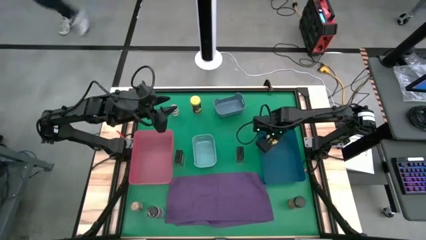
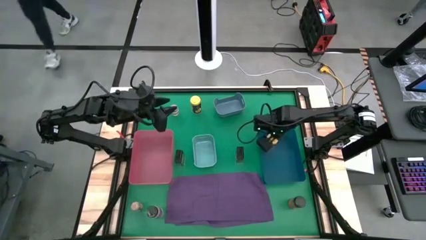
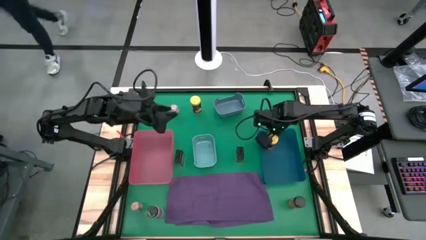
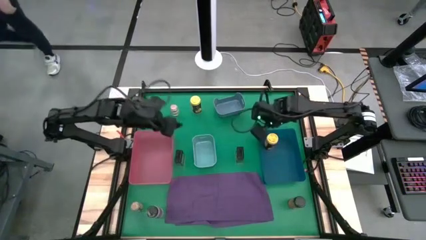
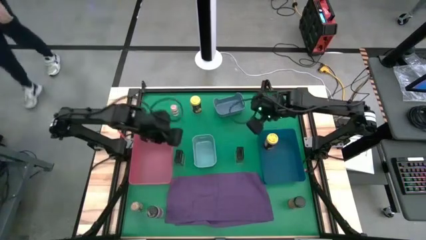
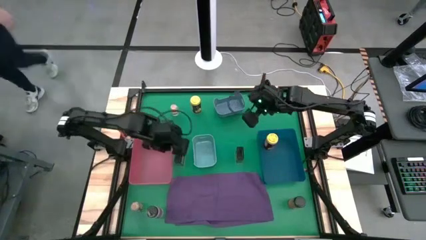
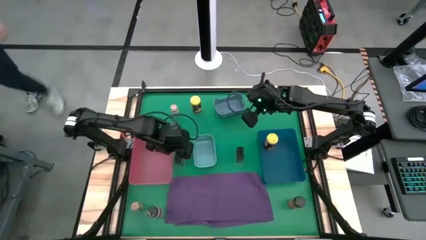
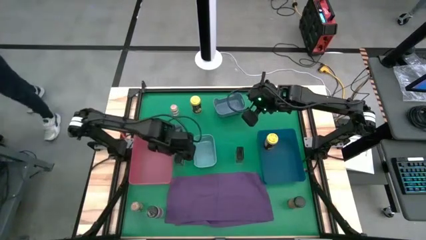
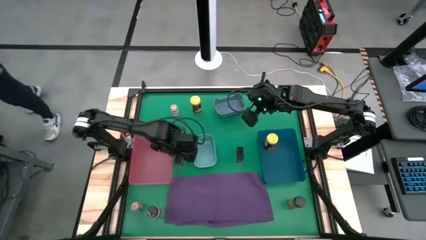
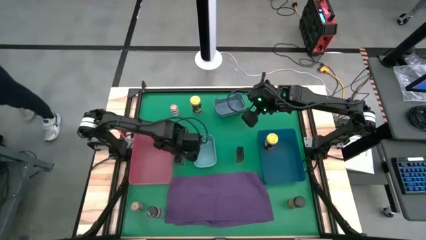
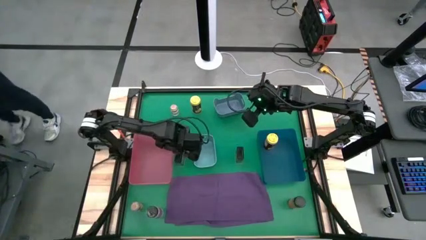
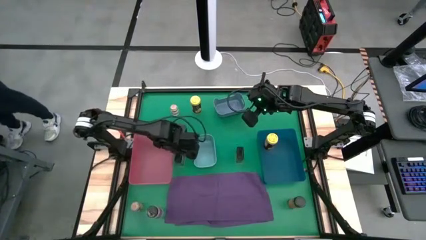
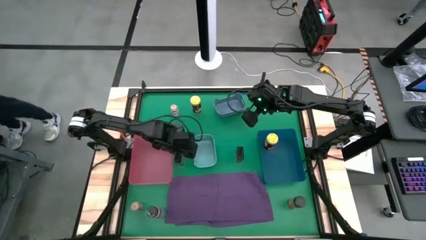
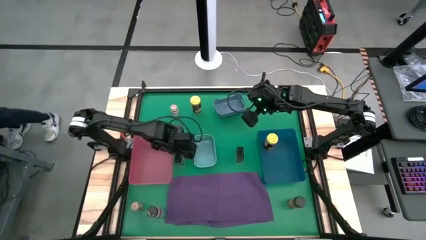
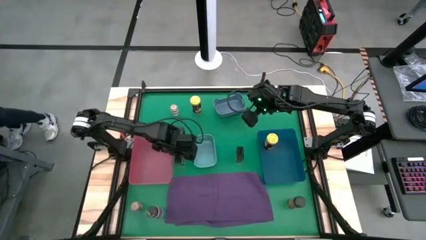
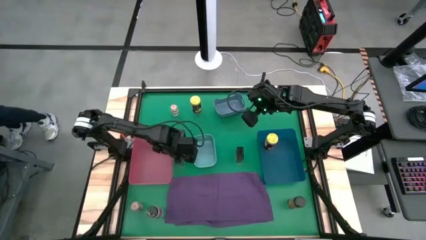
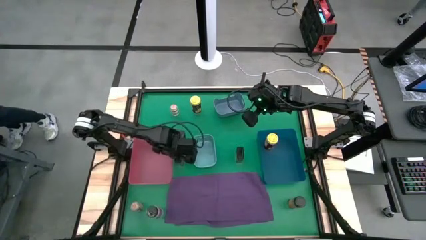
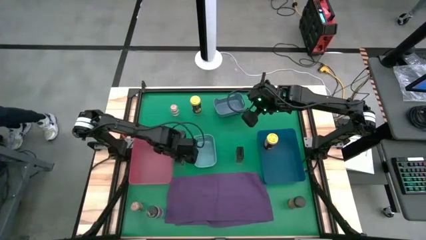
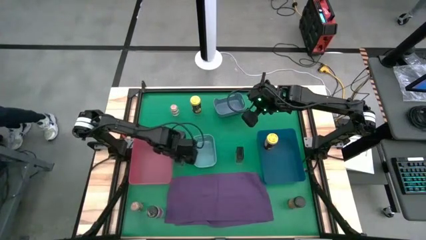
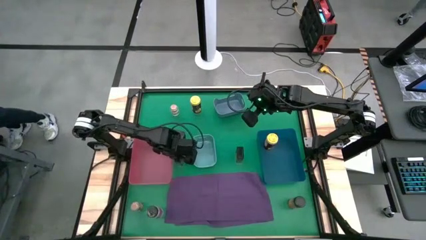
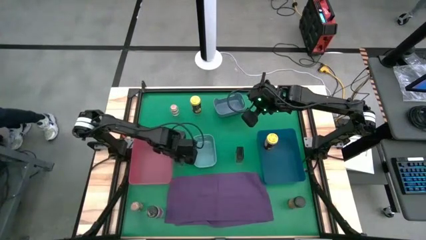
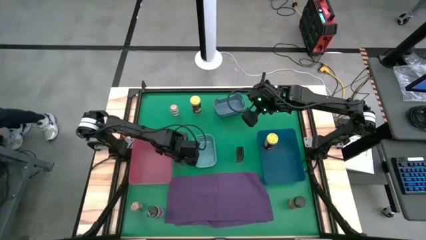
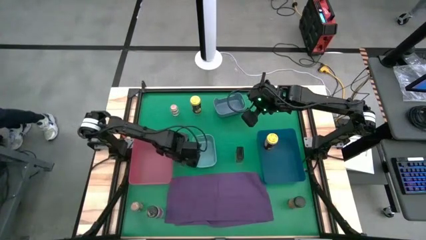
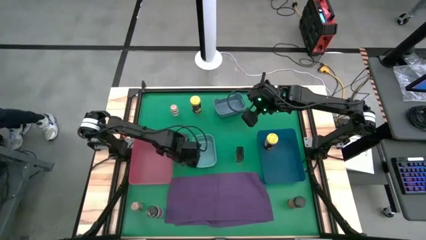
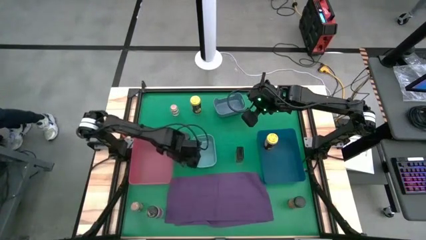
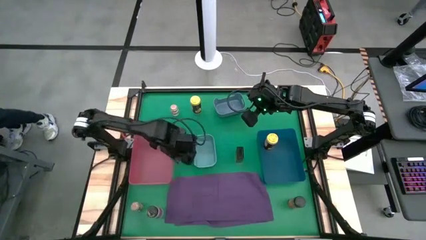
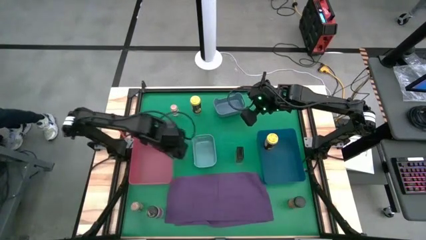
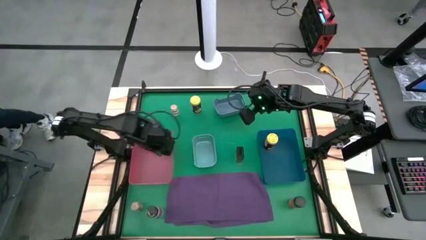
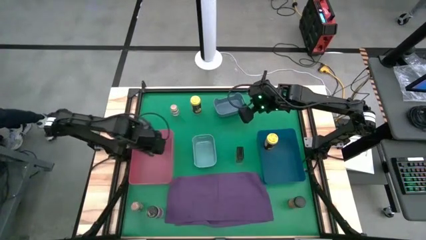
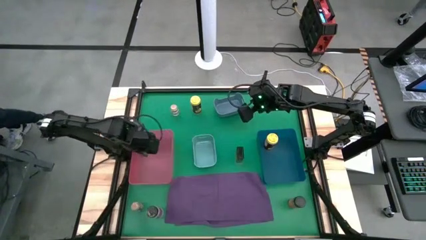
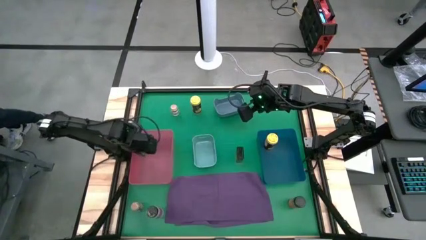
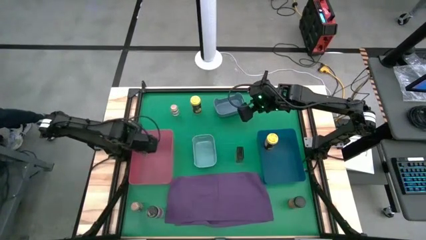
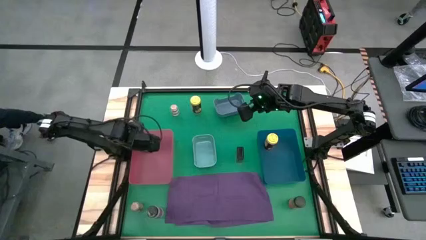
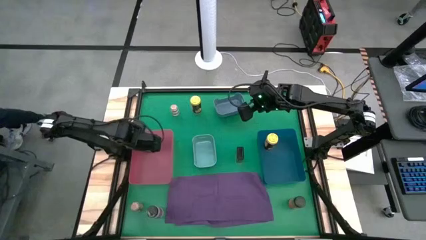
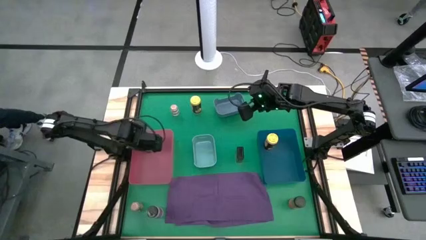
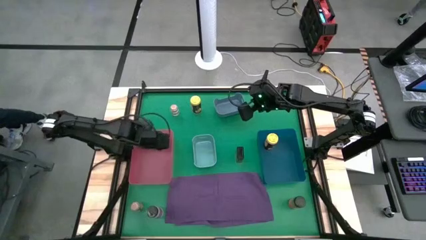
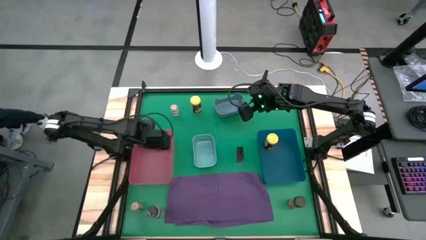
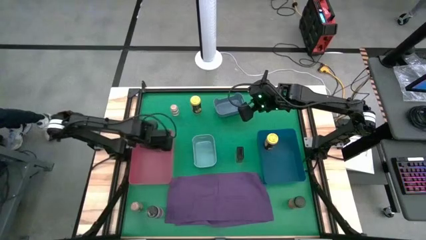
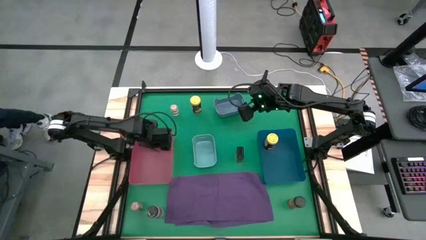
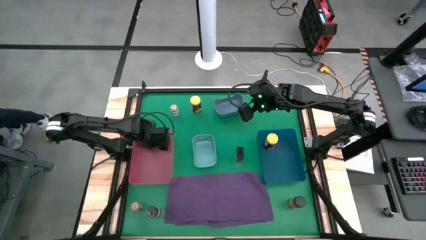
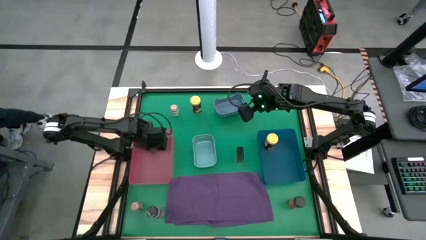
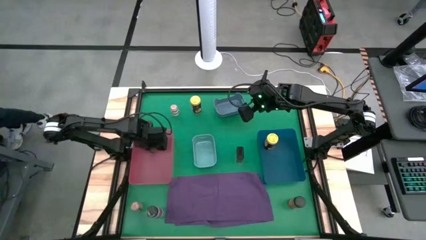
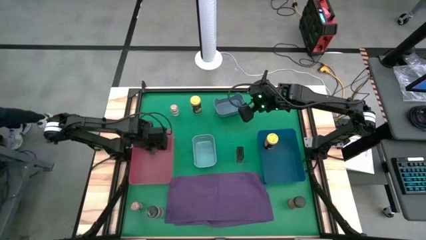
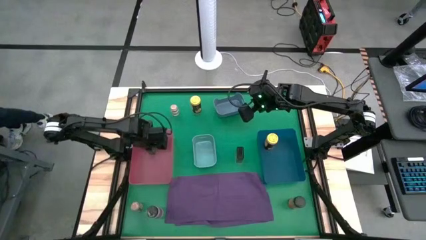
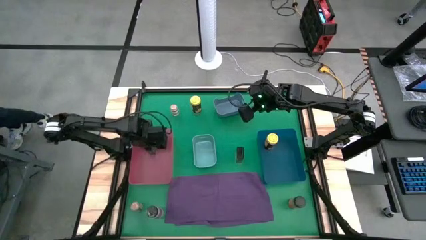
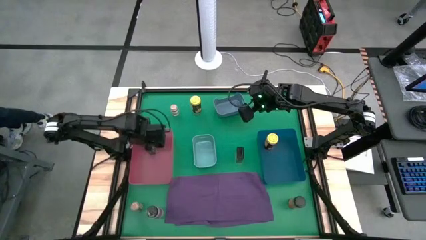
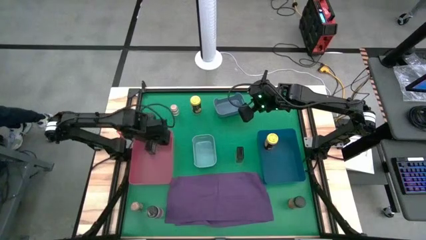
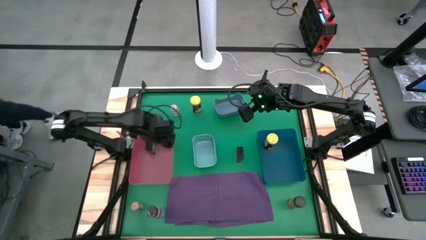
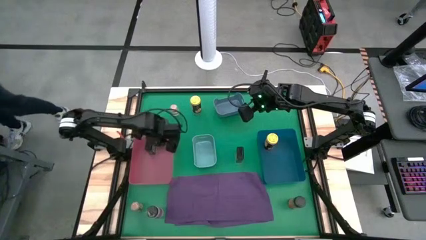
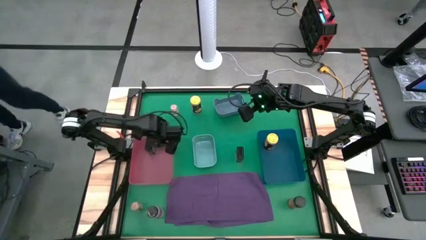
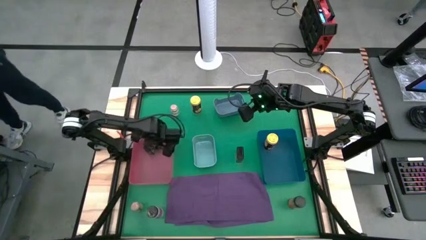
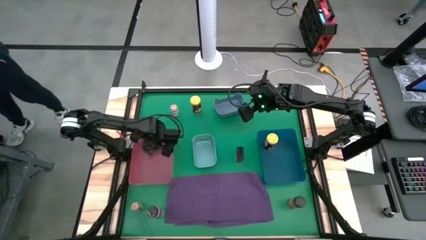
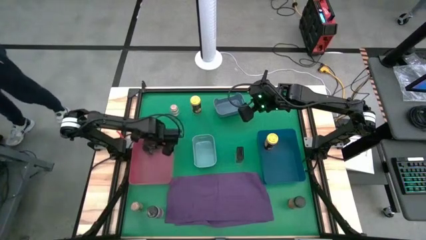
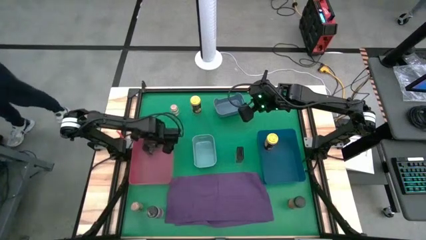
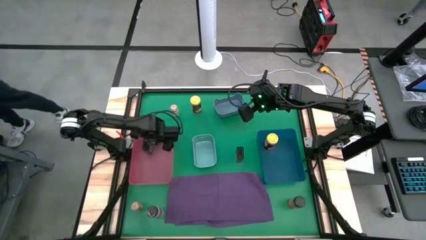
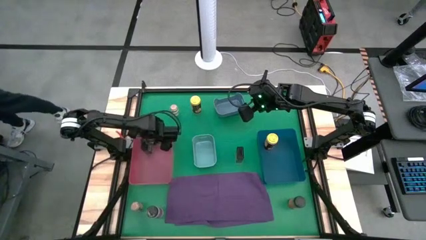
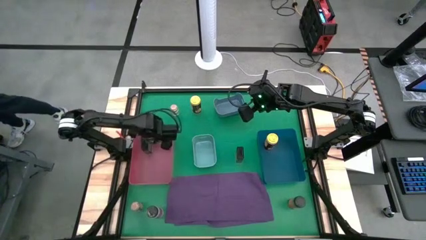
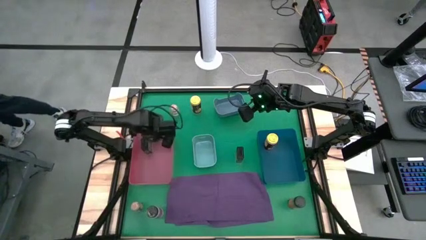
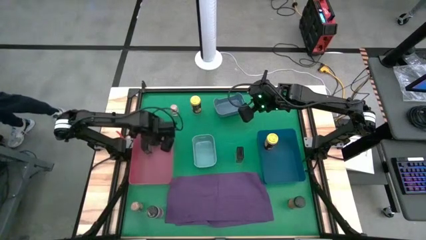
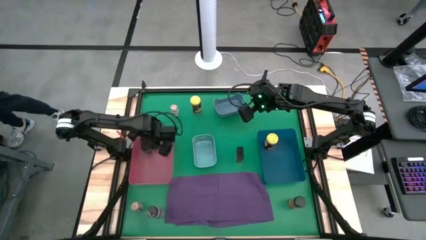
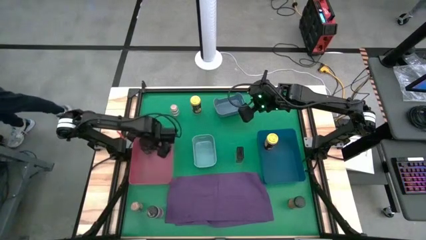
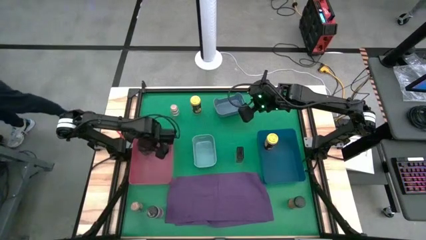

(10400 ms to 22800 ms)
Task: Sort spices by type
Put the left black seasoning can into the pink bin

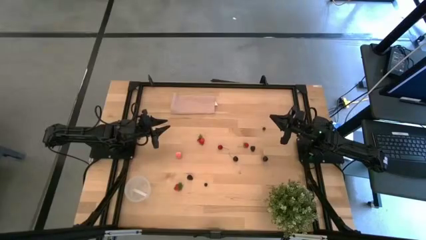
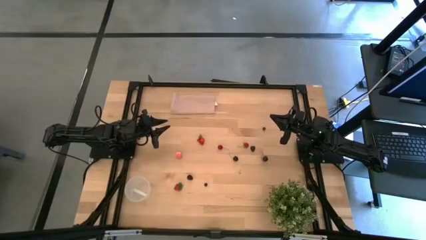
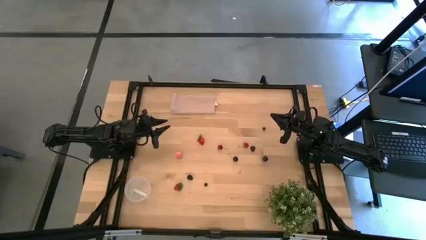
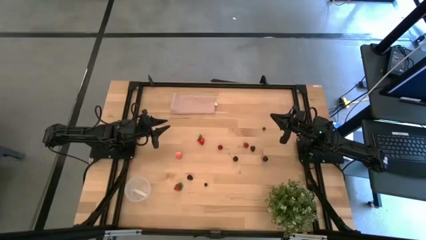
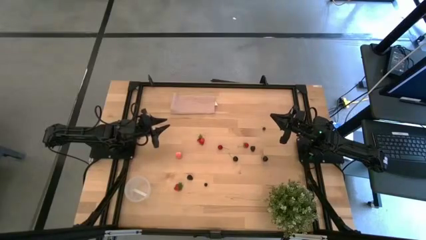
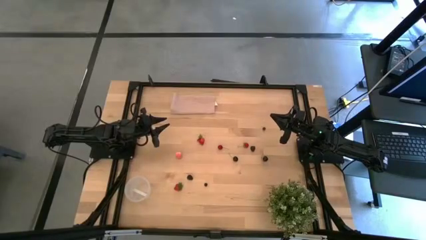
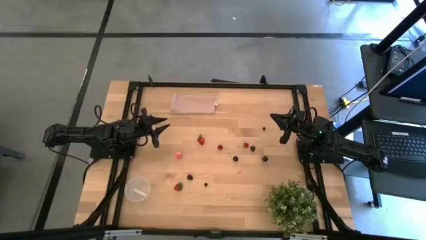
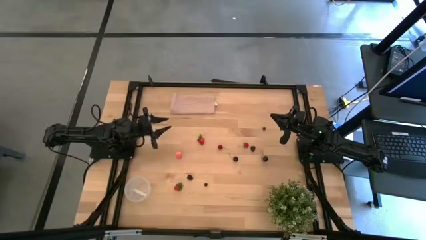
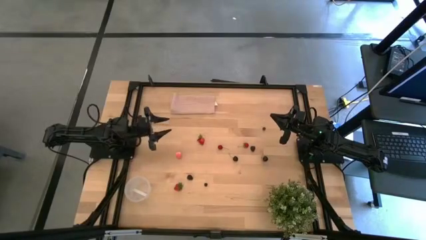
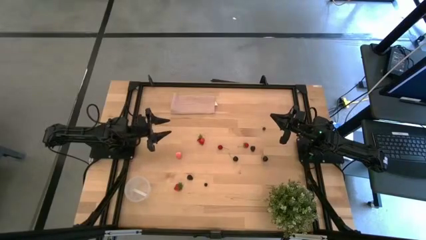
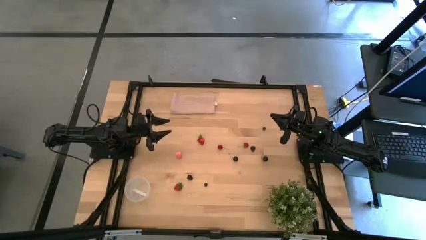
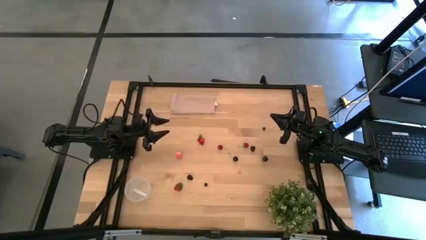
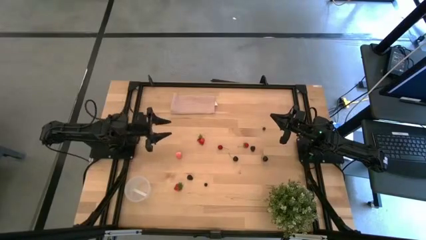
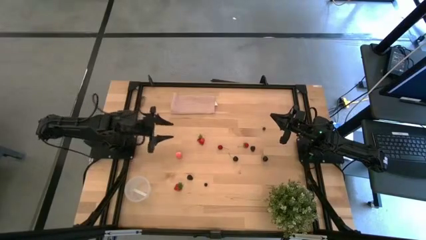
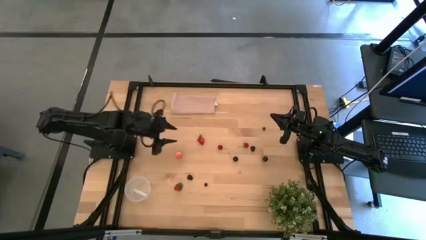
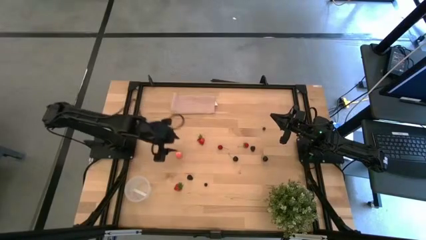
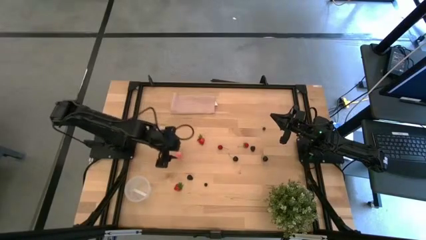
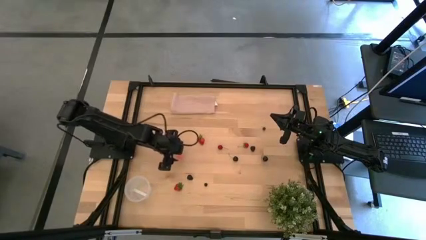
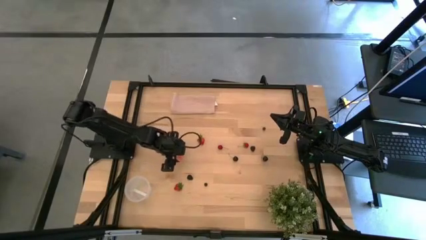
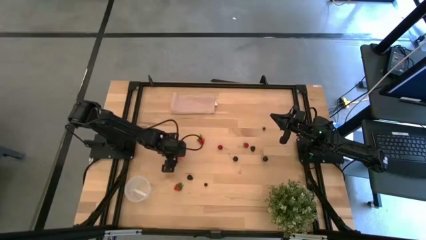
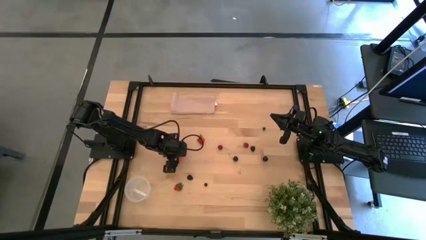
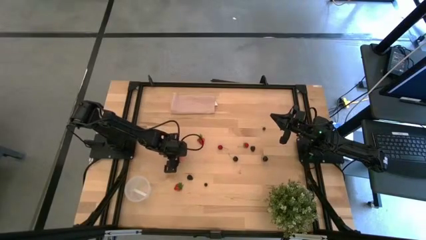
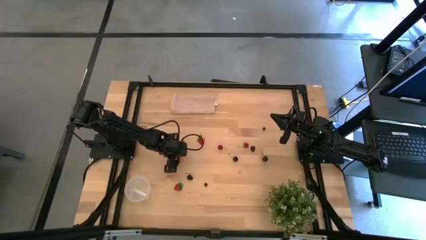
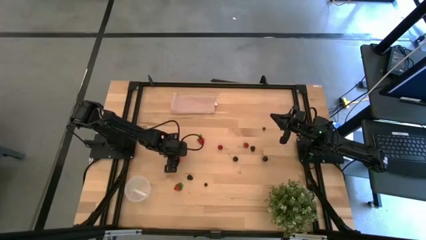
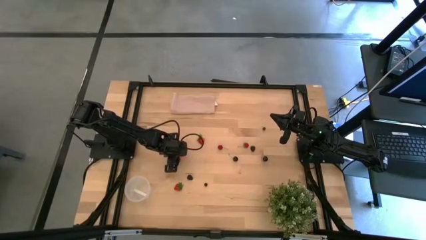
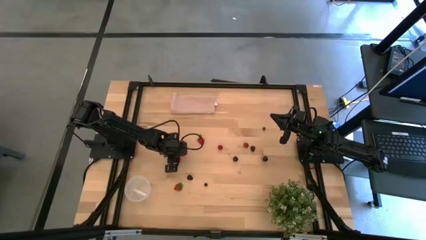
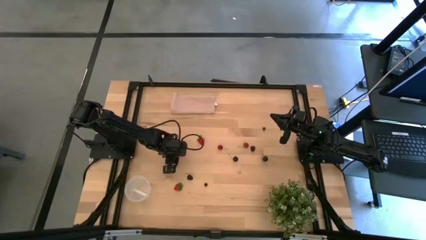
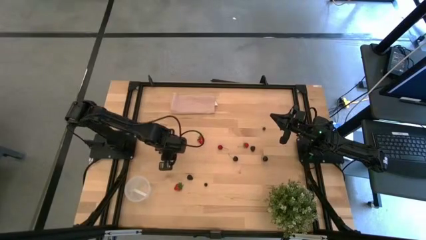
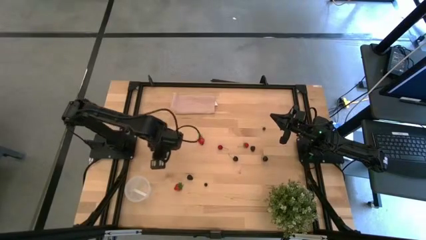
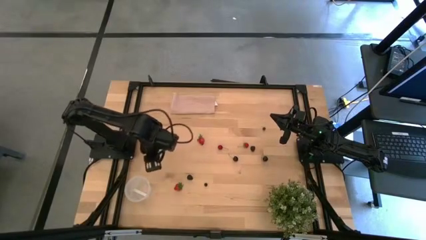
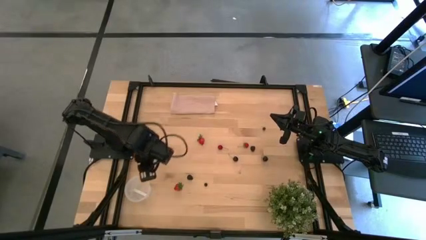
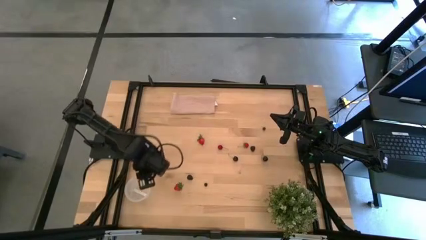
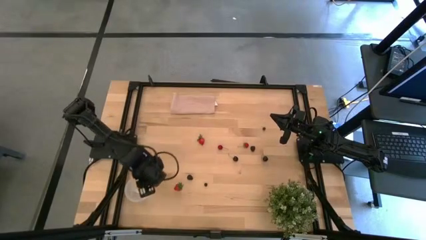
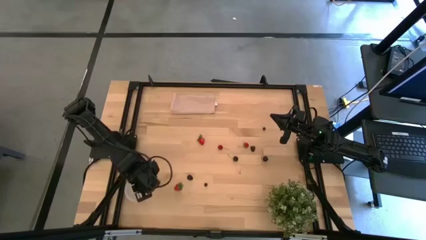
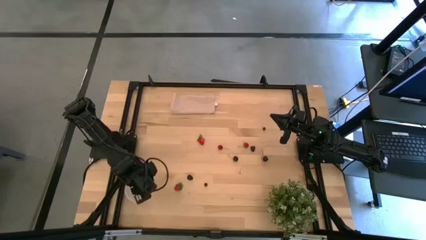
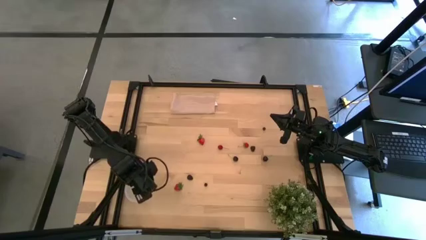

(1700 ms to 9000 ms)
Task: Pick and placing Produce into tupperware
Put the peach into the transparent bin
